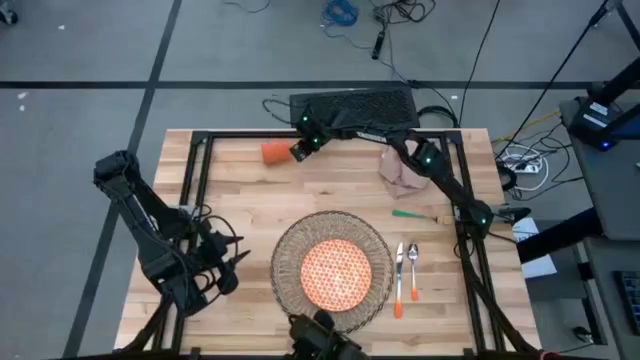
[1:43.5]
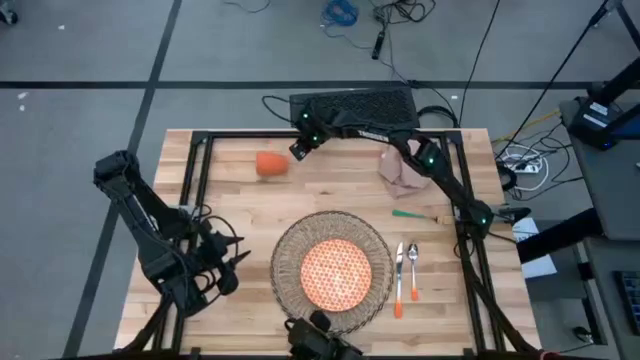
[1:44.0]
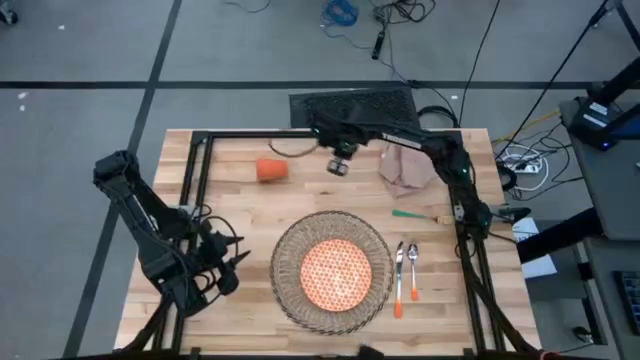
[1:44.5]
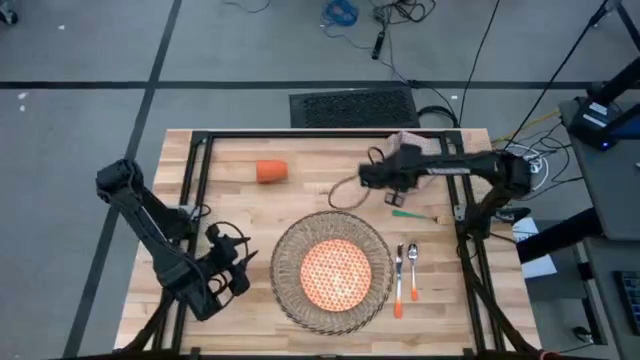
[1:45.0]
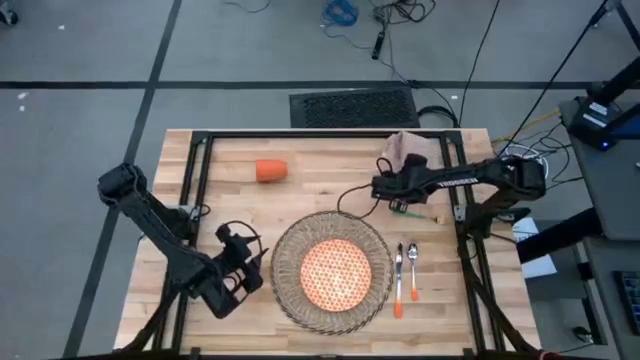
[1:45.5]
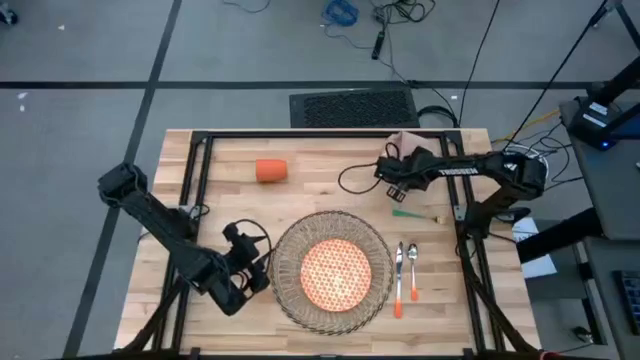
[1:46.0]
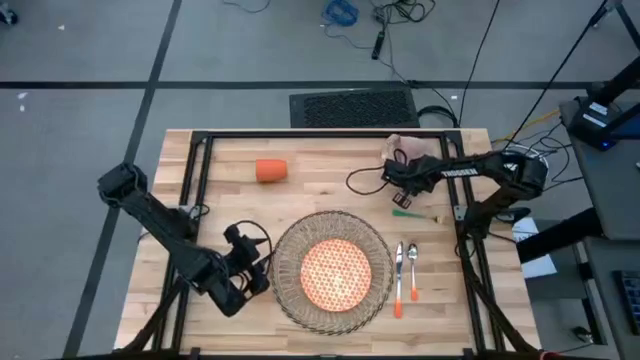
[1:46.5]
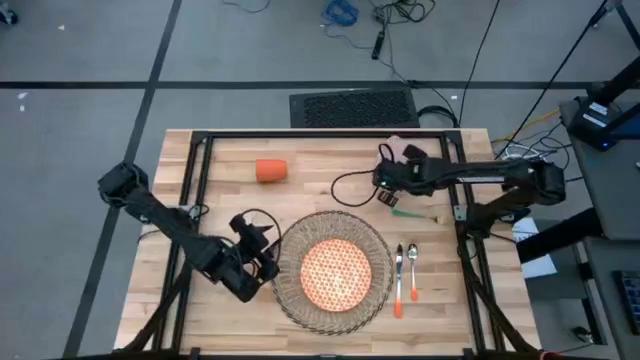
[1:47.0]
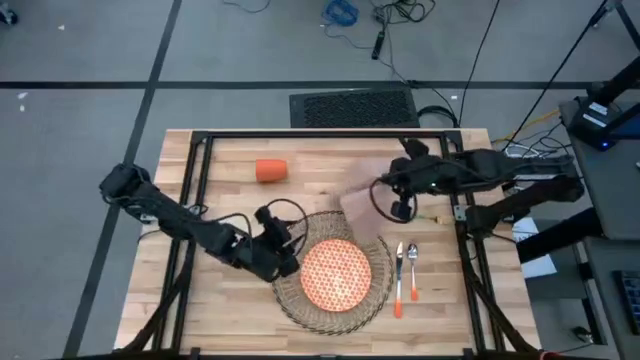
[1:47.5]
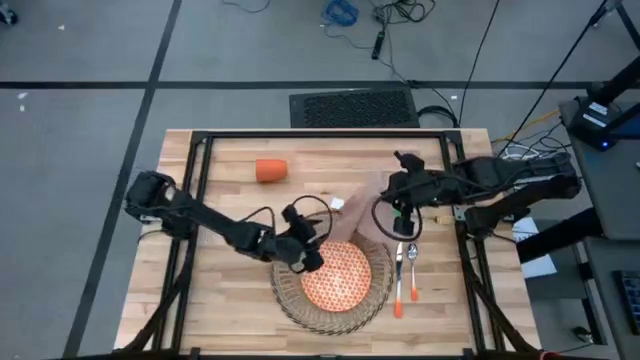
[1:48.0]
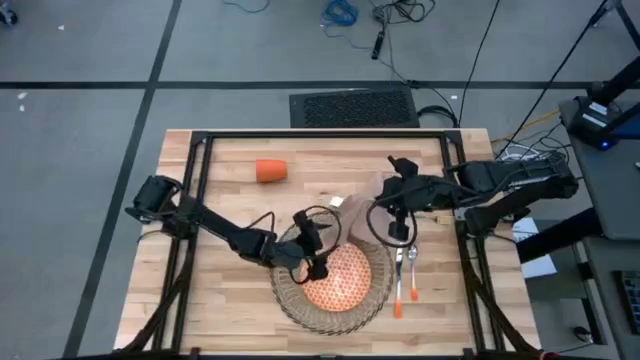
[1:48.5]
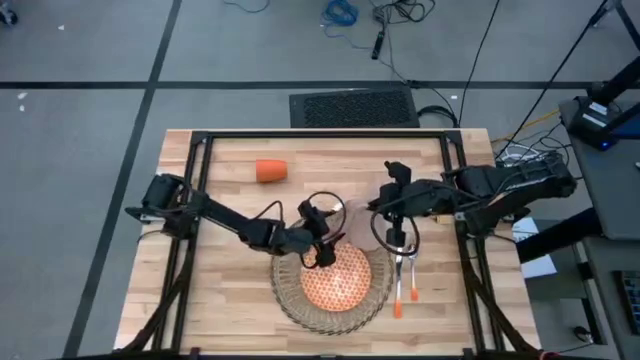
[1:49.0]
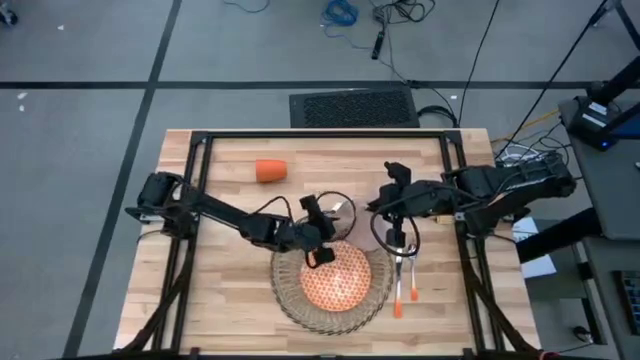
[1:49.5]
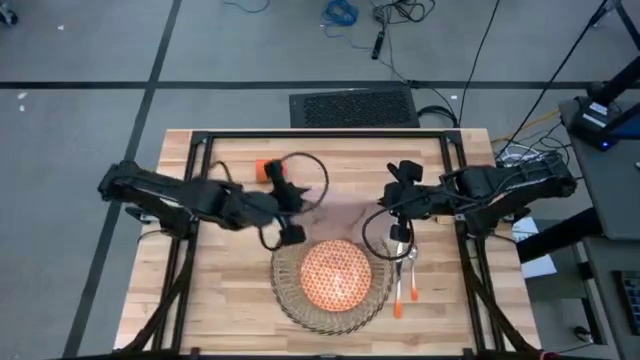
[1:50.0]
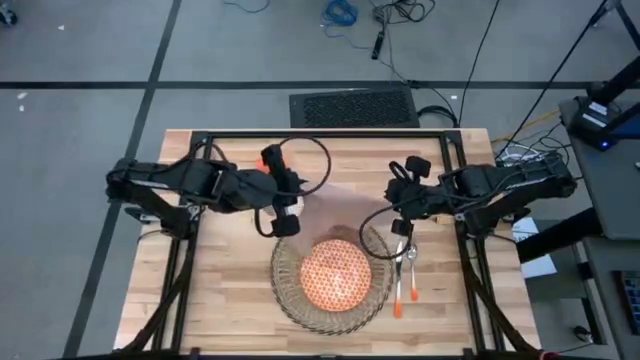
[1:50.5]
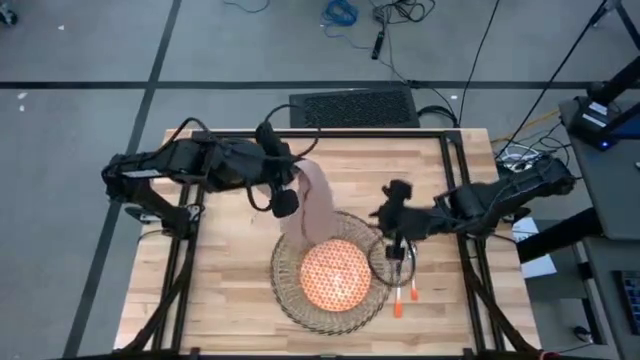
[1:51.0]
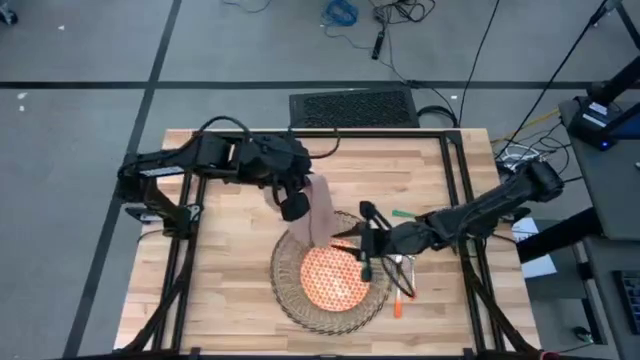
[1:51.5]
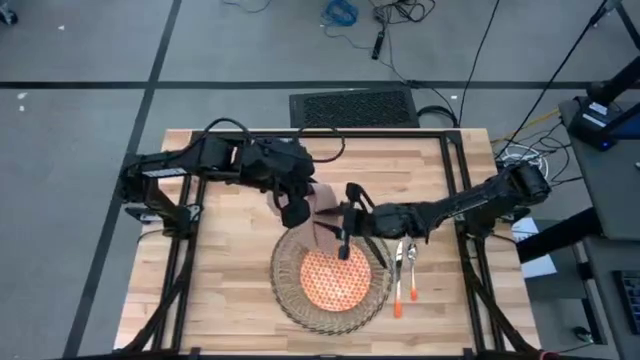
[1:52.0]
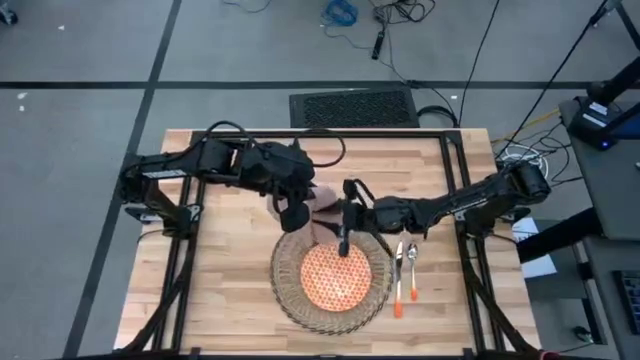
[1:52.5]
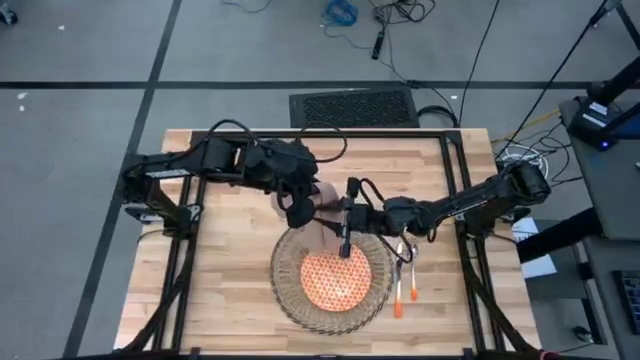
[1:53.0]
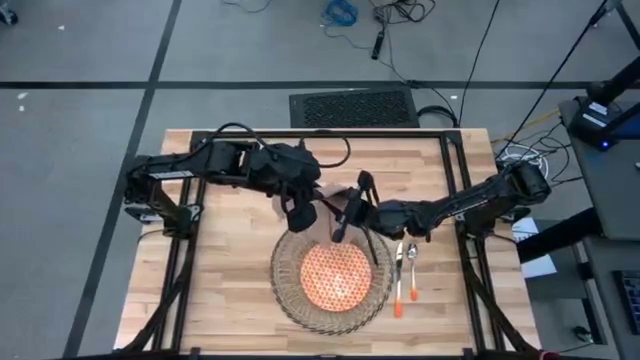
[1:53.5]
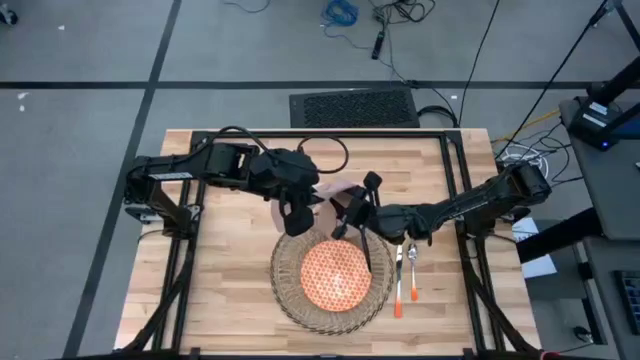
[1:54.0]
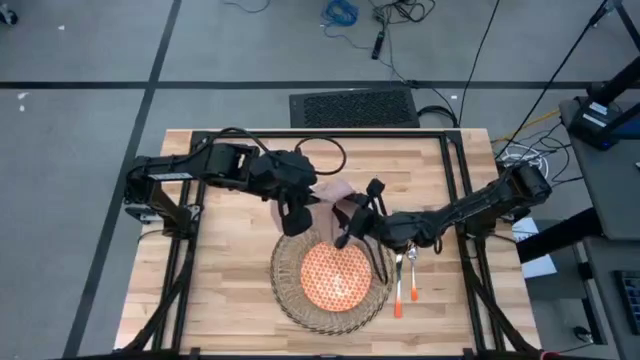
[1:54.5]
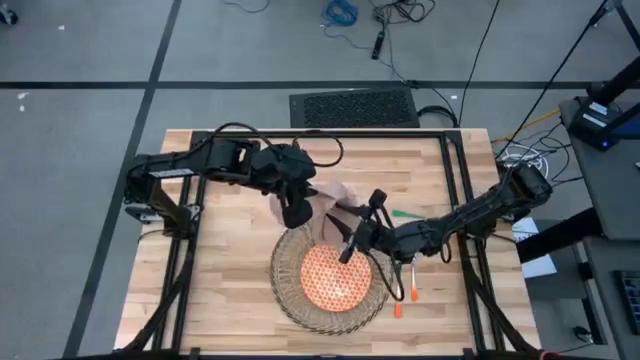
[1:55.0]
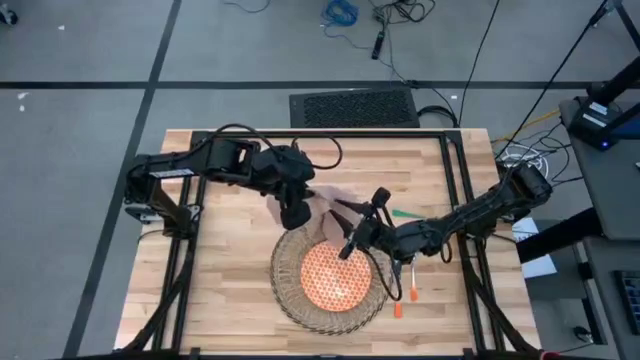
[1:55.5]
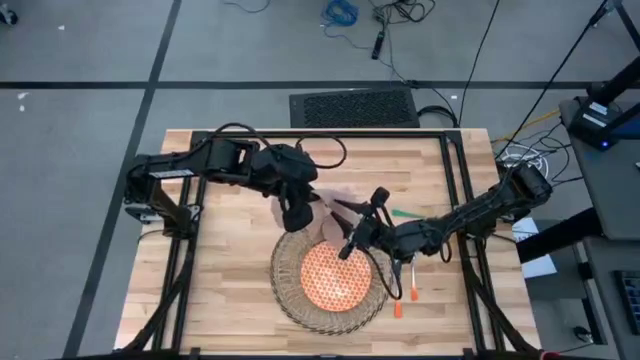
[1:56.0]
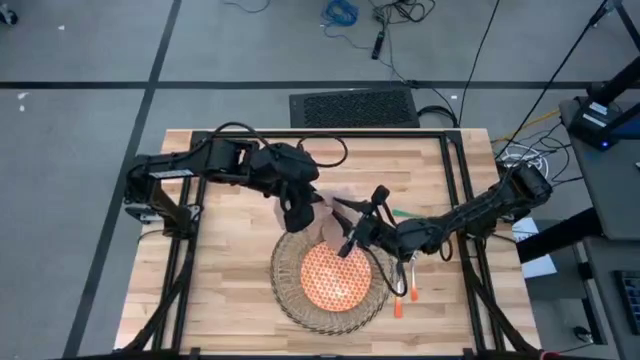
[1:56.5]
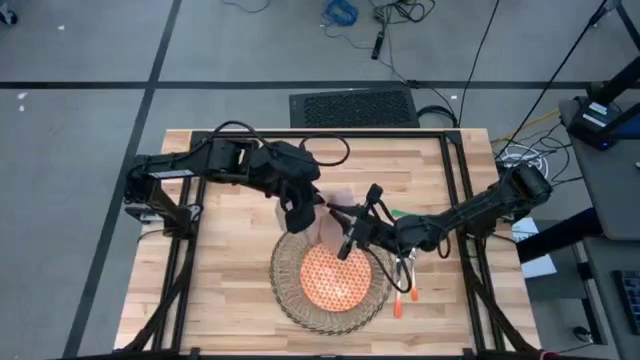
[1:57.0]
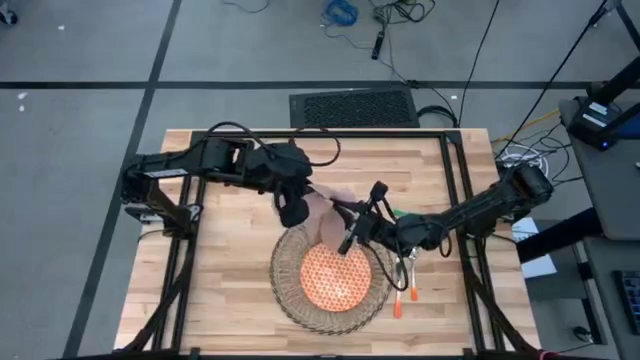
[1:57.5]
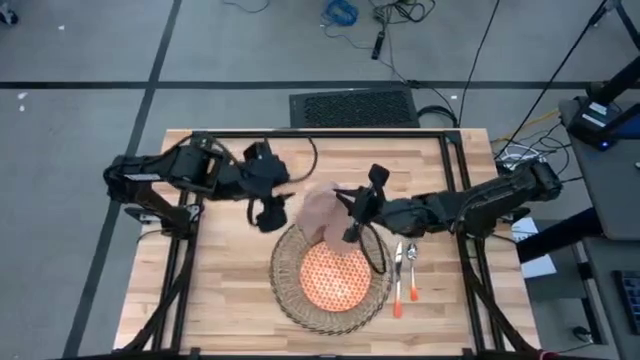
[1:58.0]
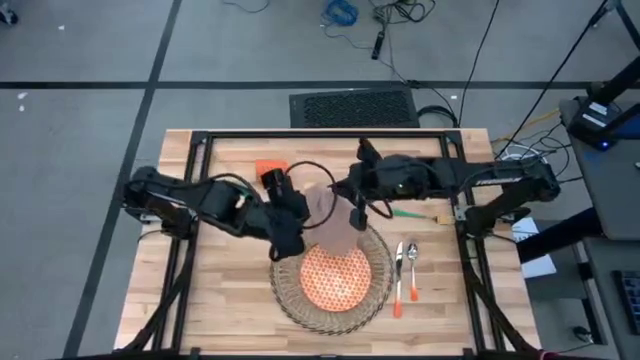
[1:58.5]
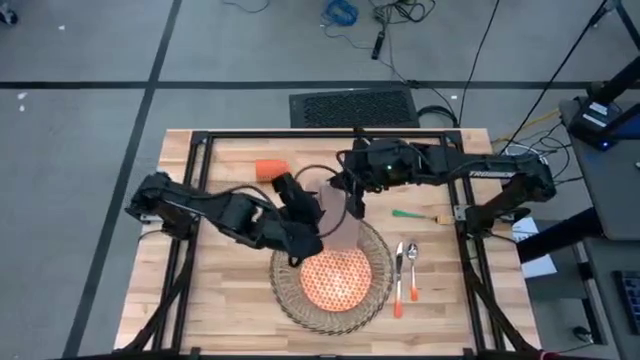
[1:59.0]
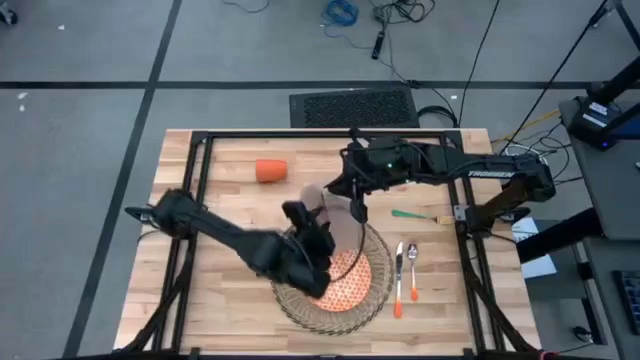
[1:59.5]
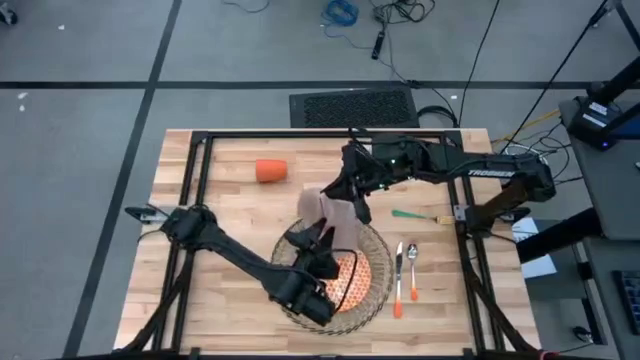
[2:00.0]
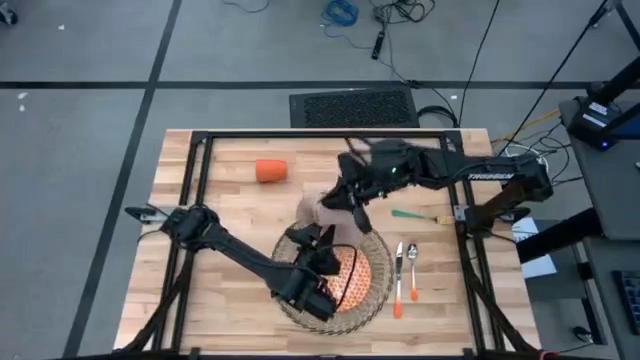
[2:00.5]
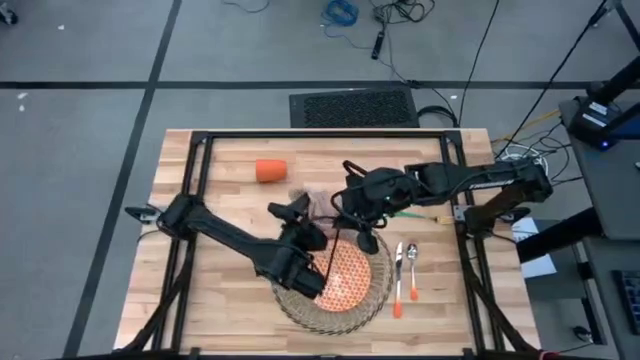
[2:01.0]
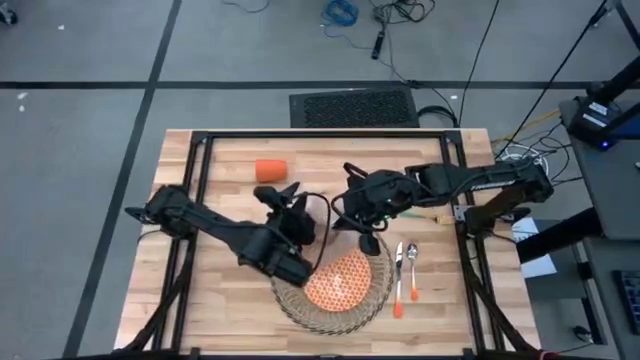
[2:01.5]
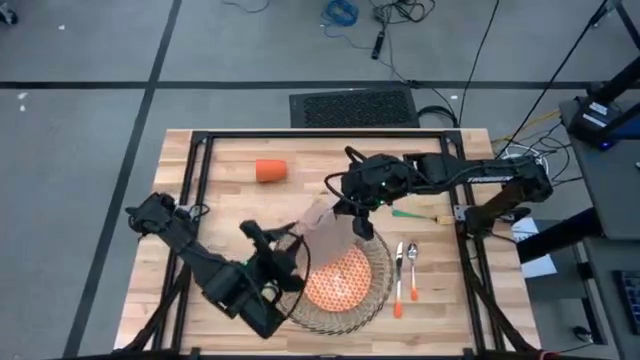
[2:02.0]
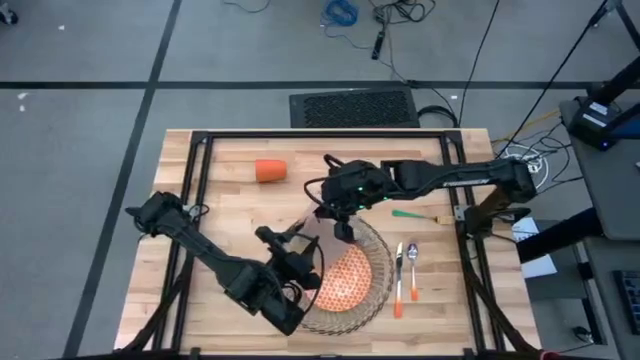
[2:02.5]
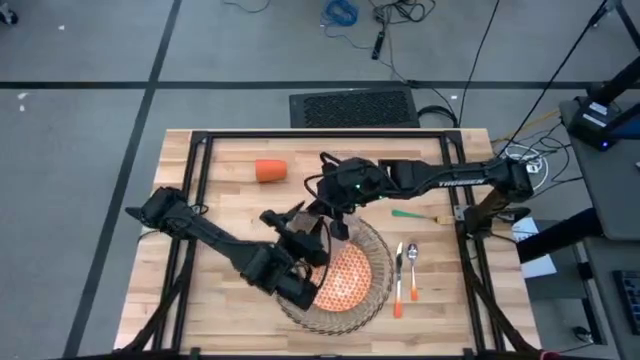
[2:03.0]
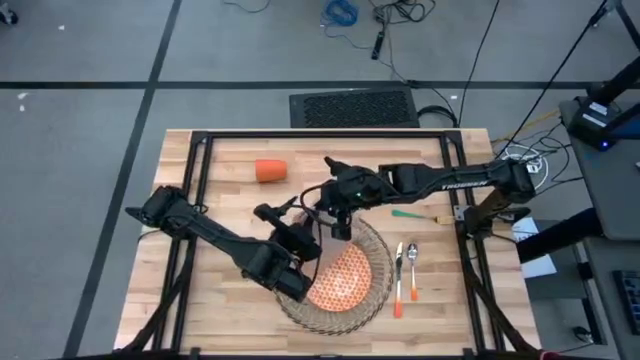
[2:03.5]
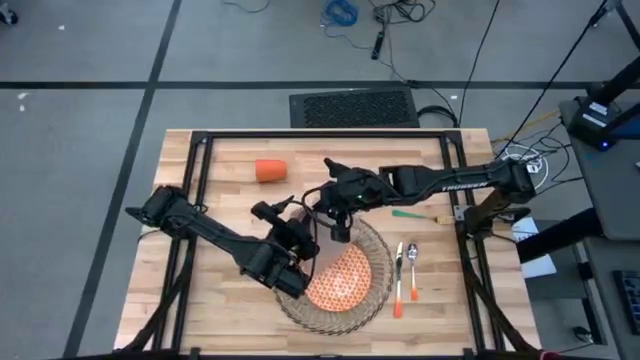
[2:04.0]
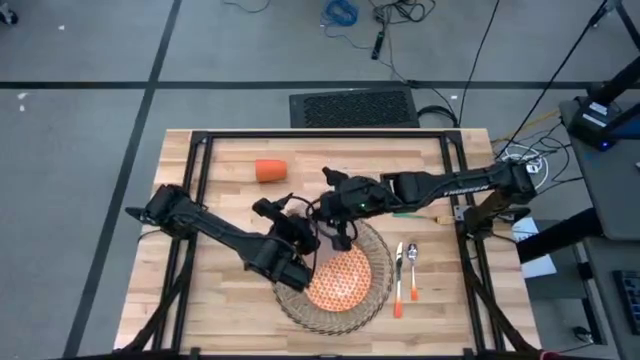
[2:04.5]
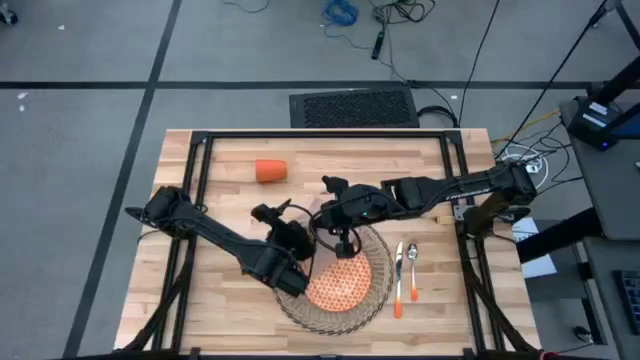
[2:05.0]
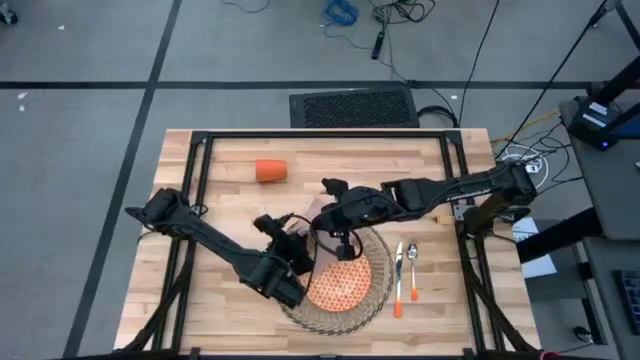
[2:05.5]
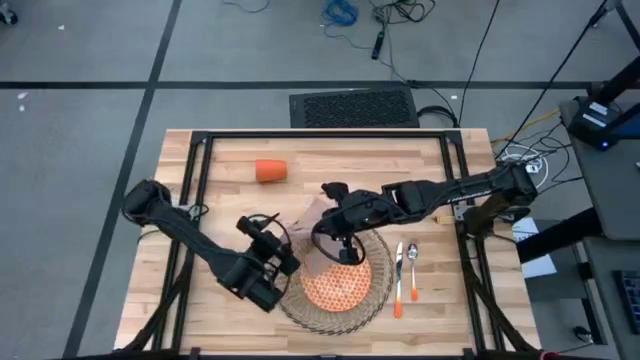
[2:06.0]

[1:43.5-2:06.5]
Task: Set table place
Fold the white napkin
